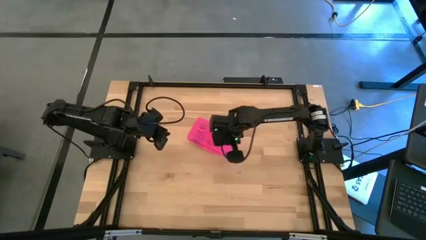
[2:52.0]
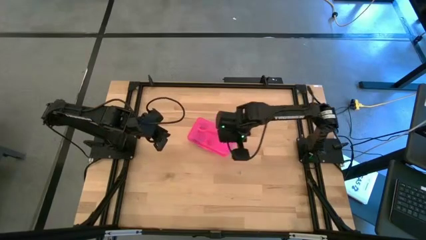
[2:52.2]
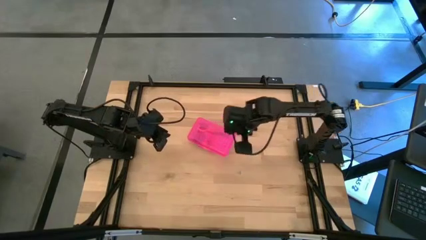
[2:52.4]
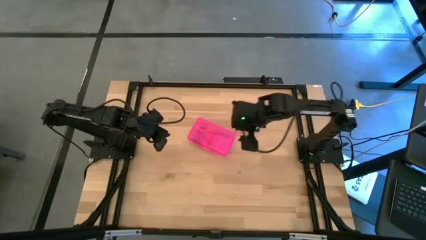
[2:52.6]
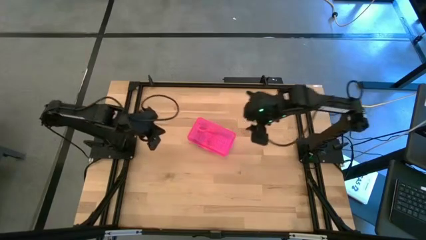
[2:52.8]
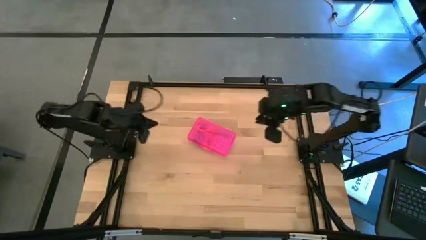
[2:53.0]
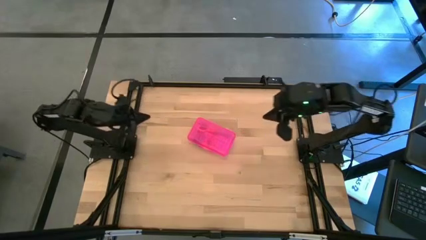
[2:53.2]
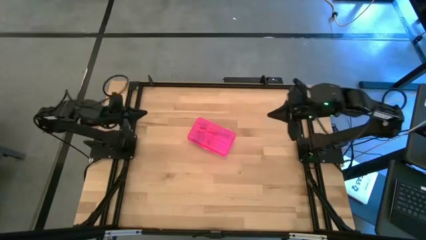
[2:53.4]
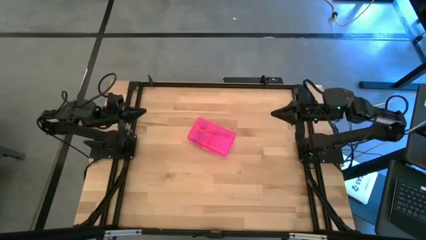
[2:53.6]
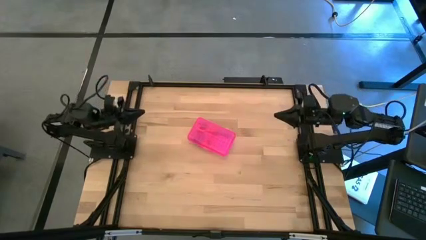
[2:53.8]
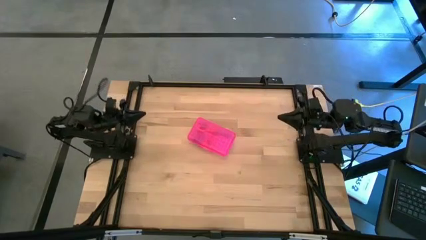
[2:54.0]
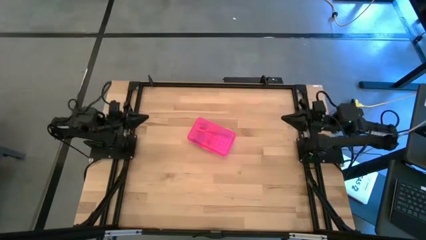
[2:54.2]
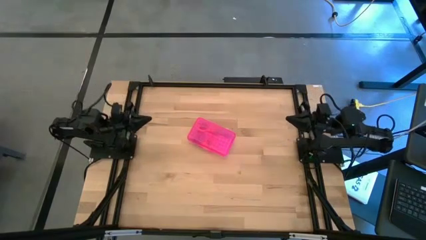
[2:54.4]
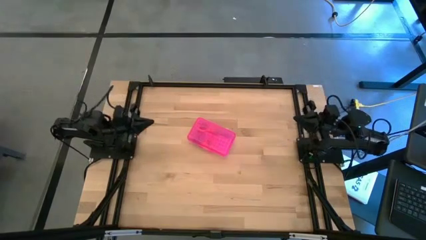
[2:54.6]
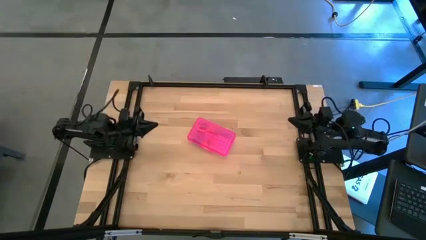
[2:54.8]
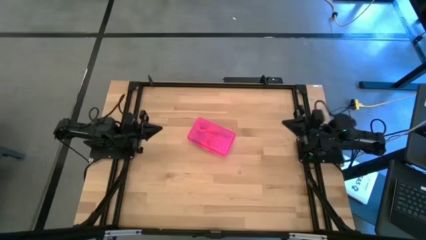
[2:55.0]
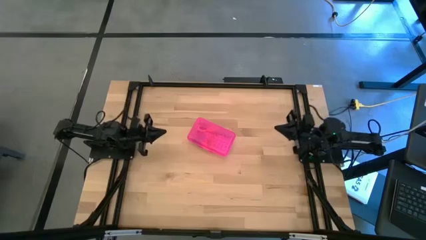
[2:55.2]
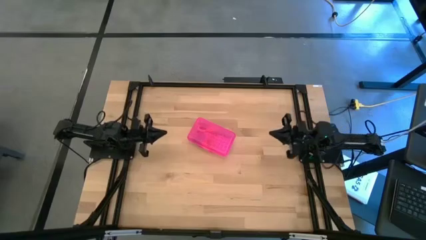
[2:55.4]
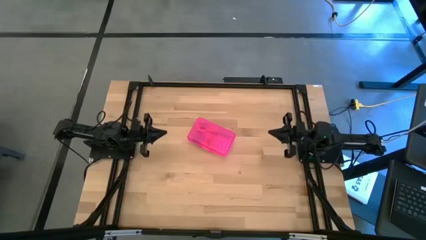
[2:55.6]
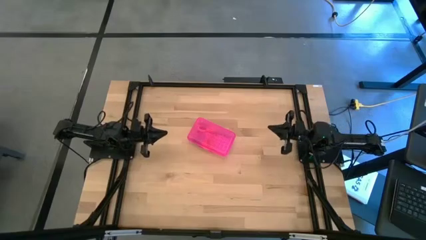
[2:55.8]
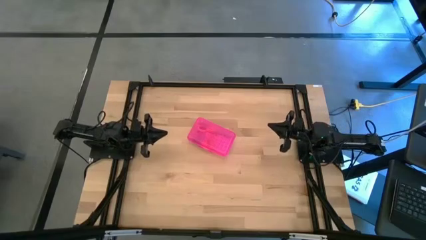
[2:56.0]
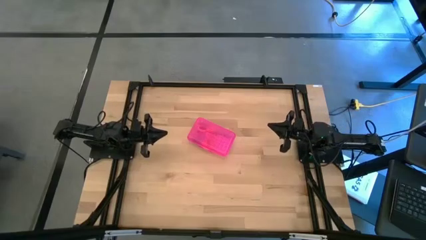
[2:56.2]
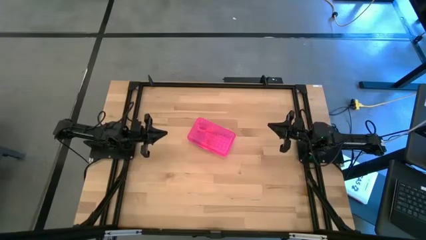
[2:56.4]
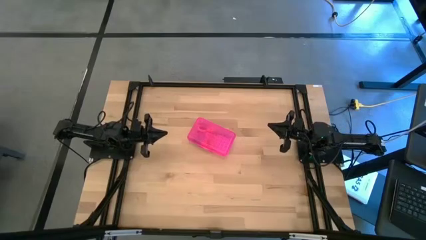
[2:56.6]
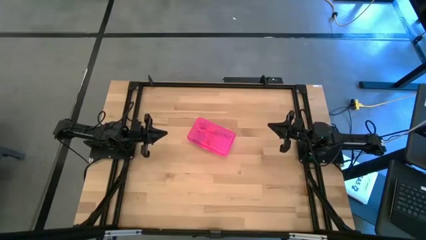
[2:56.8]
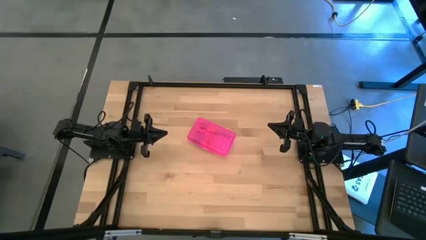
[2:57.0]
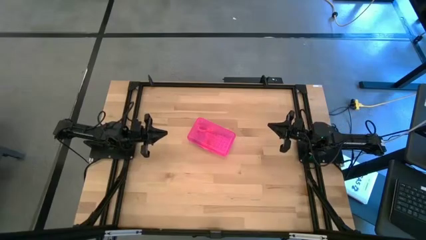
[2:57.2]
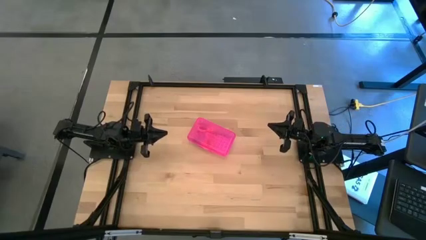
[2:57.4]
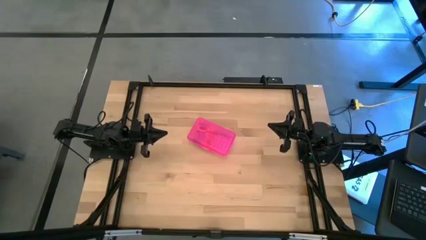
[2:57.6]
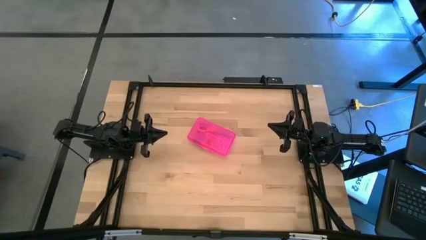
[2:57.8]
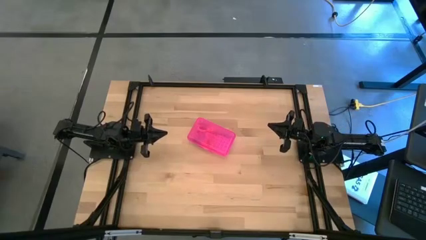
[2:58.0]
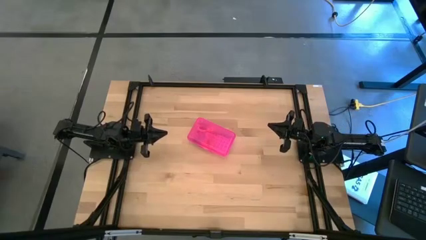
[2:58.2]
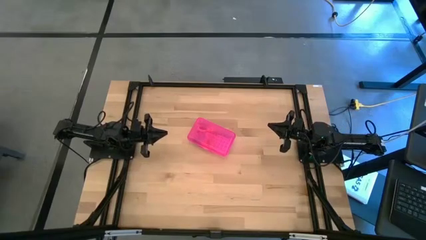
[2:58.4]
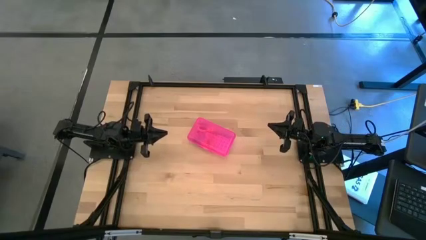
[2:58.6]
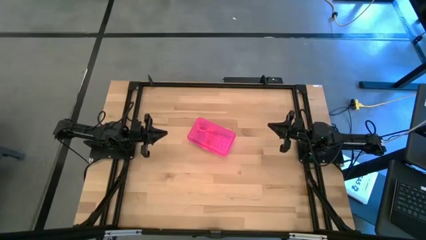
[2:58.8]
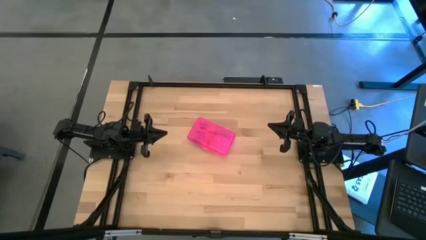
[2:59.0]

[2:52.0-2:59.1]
Task: Pack school essentials
Return to Home Position

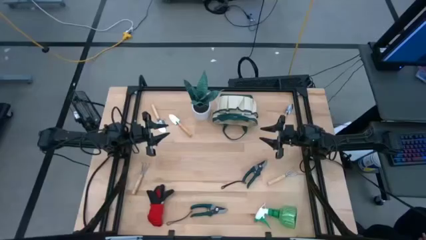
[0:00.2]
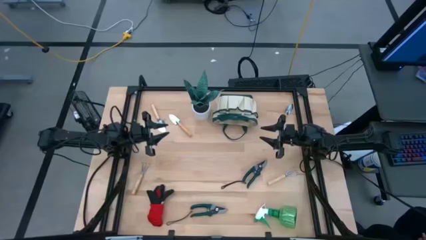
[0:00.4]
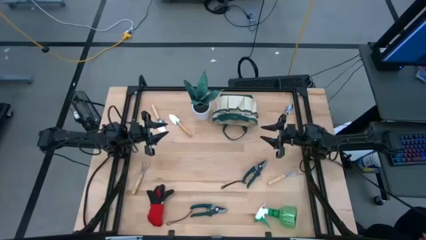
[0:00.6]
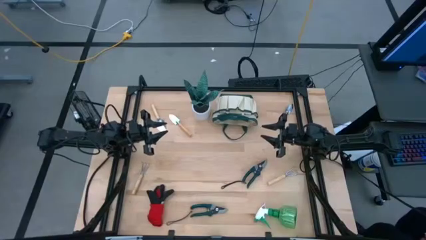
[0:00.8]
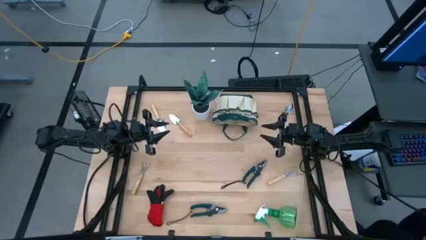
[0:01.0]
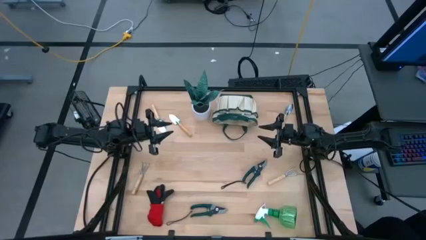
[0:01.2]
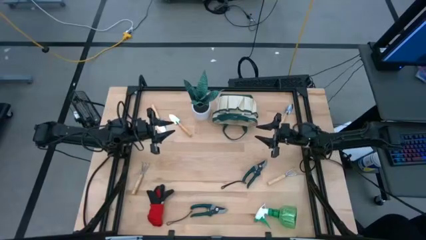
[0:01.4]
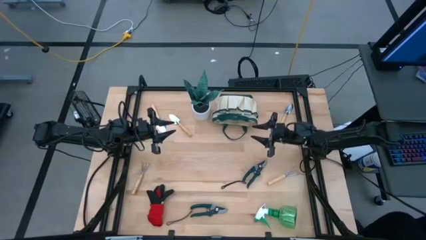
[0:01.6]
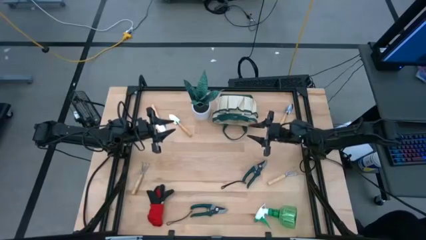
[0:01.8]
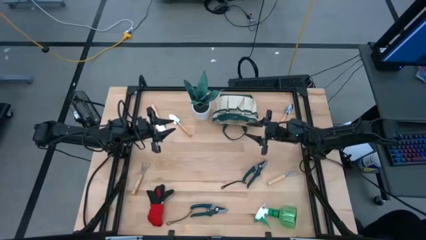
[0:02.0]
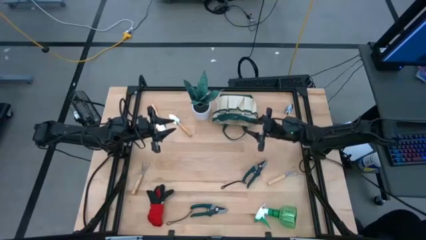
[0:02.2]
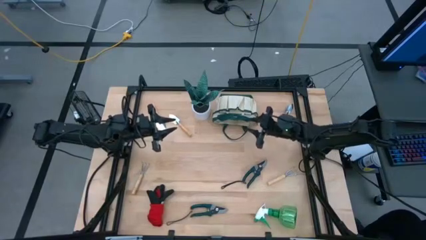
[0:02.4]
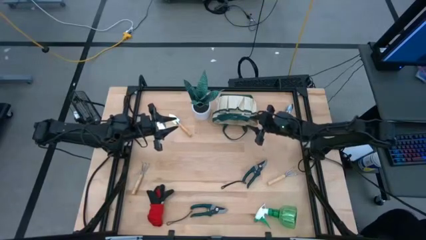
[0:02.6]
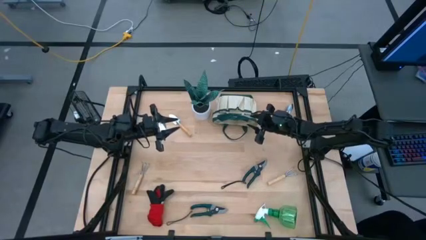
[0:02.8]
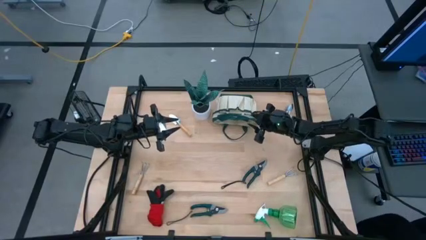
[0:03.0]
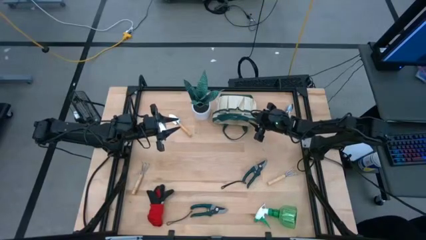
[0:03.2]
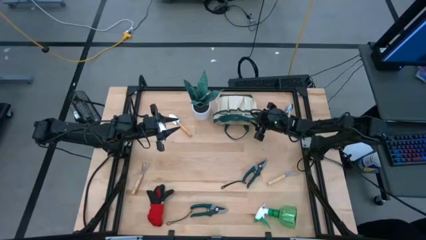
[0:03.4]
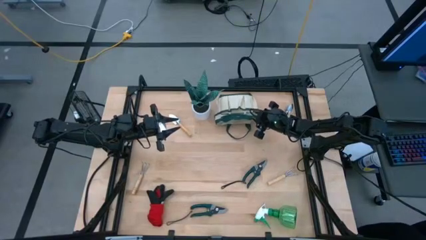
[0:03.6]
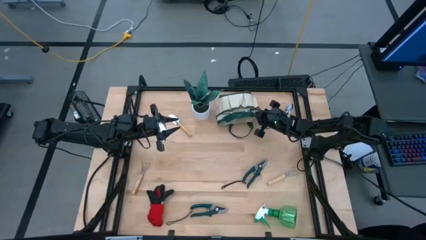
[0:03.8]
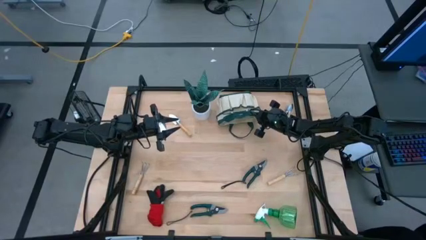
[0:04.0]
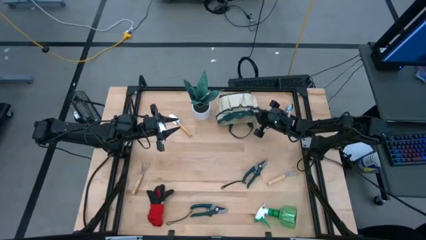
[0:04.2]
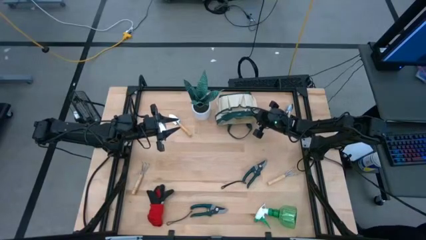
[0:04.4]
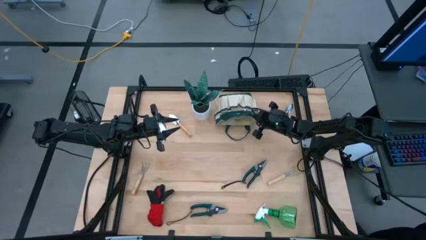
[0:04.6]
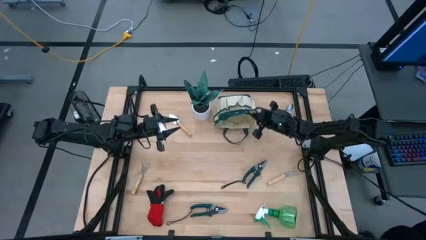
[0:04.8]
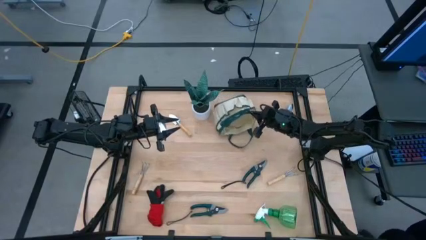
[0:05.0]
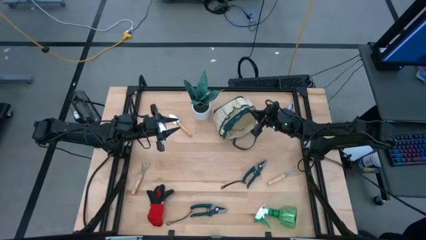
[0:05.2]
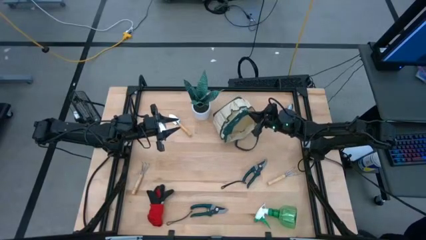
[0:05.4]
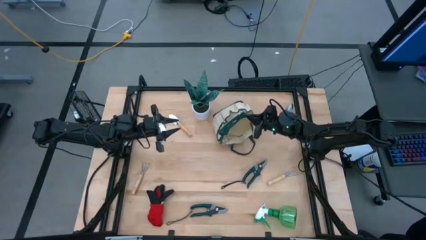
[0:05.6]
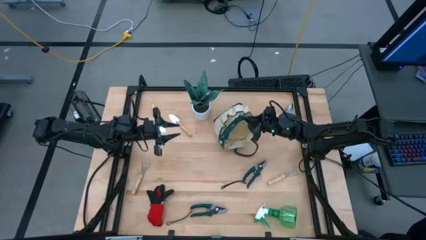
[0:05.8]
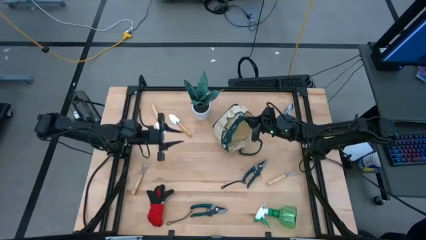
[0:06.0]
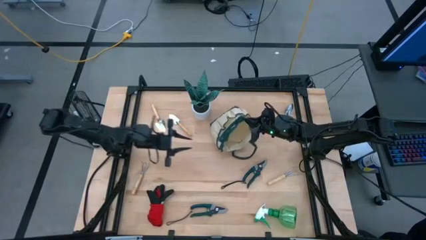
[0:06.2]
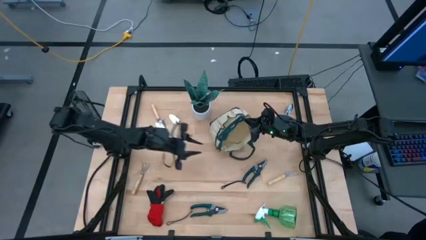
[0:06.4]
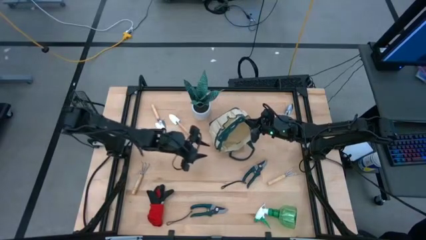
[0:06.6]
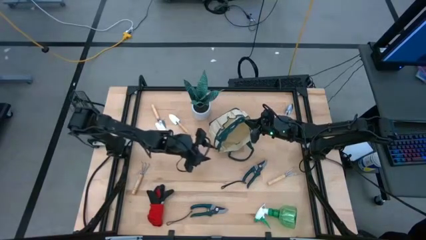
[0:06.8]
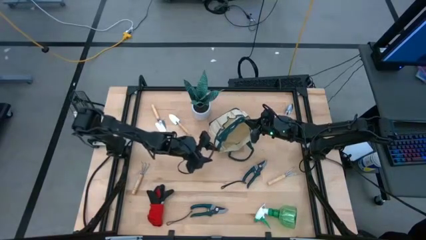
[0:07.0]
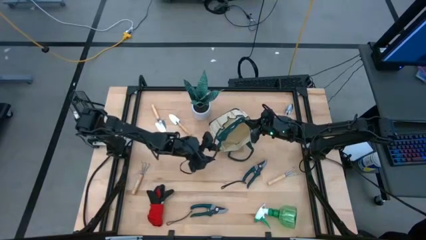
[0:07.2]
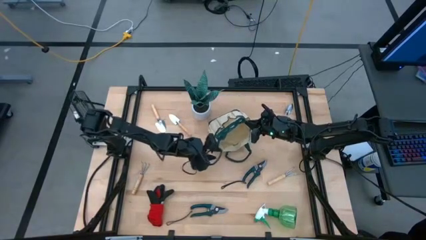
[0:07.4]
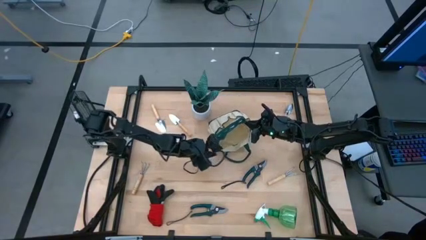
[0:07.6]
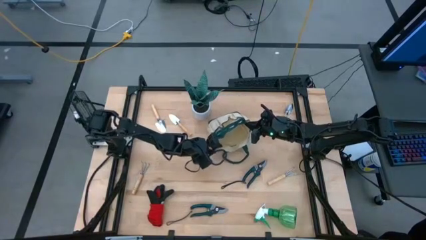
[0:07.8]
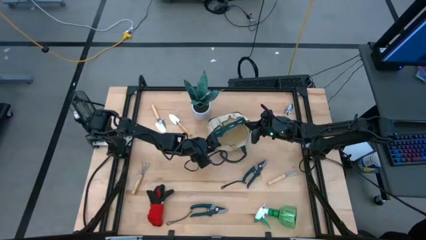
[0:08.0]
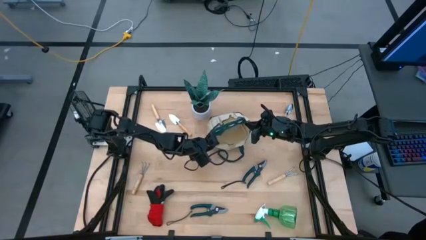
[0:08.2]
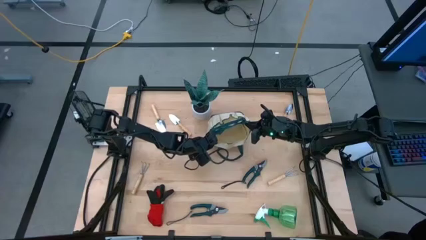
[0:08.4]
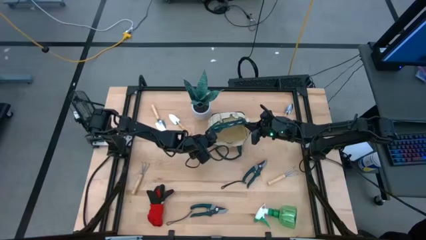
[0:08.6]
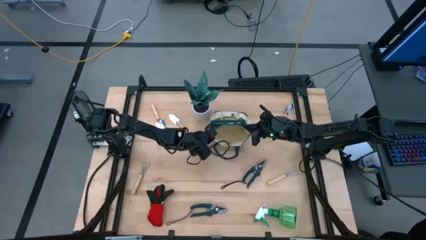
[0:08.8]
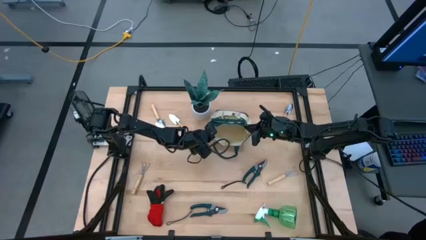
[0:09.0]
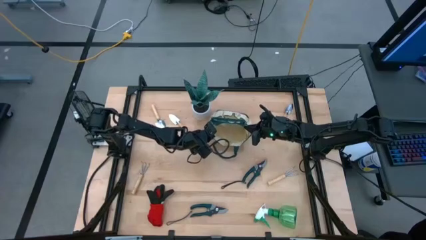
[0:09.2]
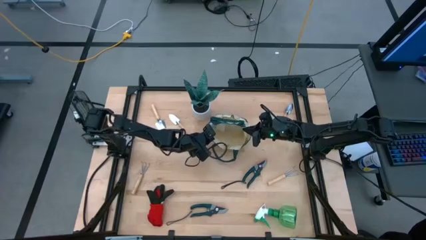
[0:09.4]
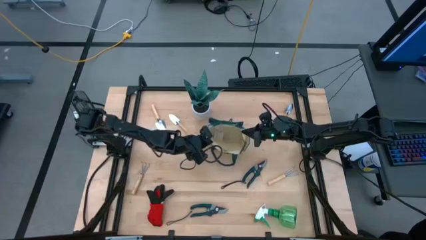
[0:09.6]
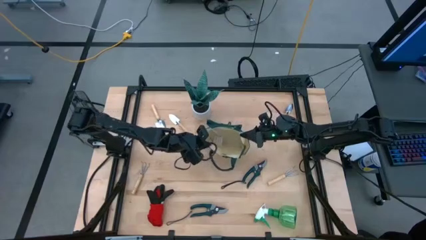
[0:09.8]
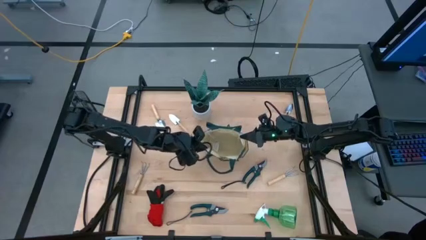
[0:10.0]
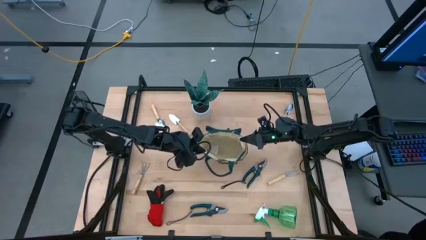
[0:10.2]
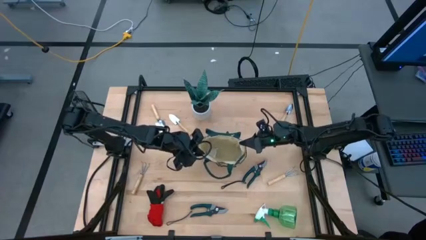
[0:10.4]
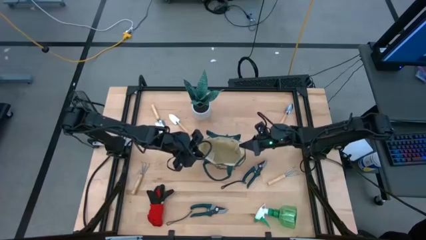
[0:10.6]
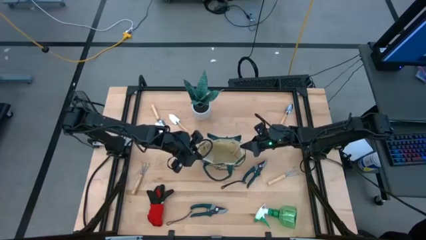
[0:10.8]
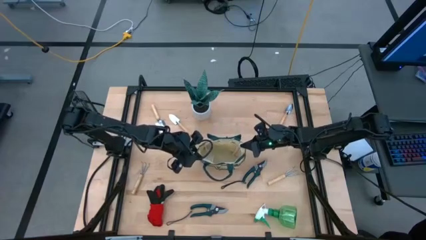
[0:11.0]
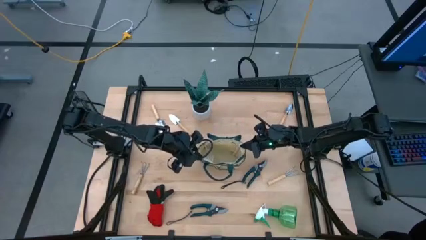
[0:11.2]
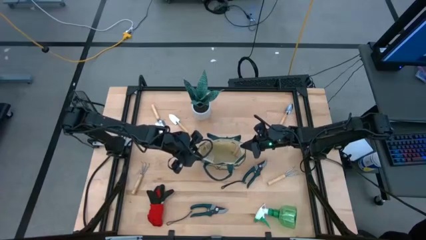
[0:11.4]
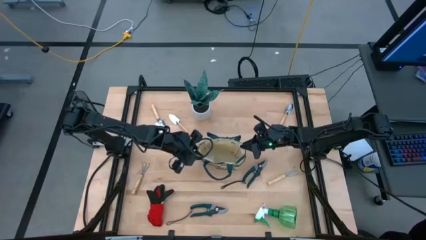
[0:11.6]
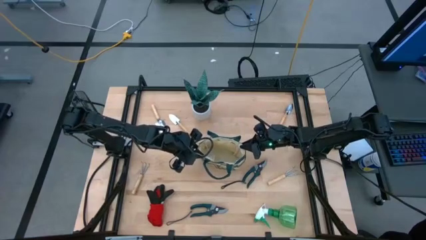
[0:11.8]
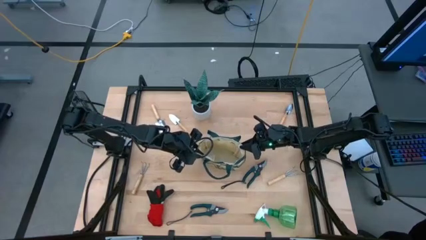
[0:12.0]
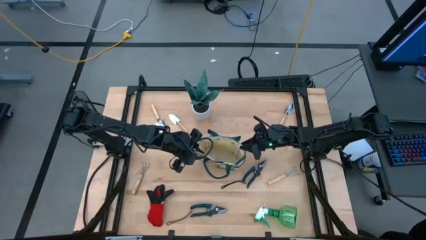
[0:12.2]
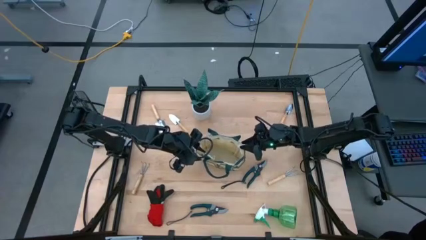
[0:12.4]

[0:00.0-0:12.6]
Task: Pick & Place Garden tools in Gardening bag
Prepare the gardening bag
